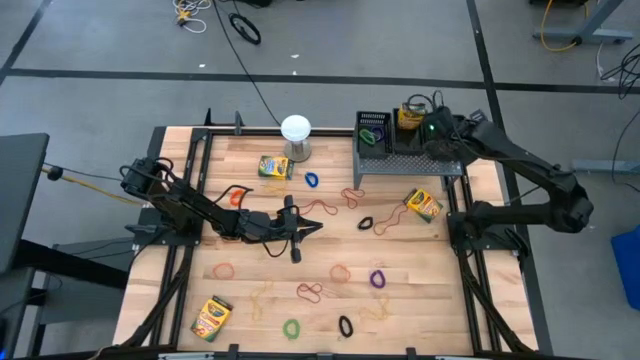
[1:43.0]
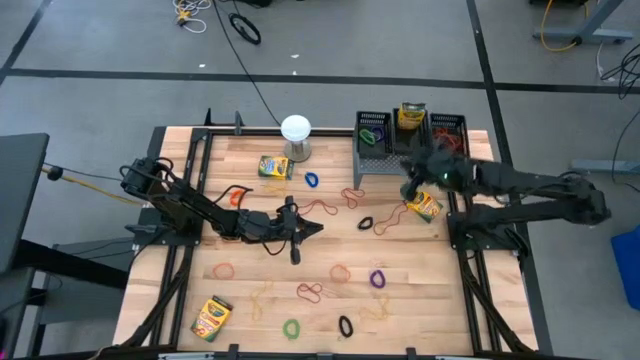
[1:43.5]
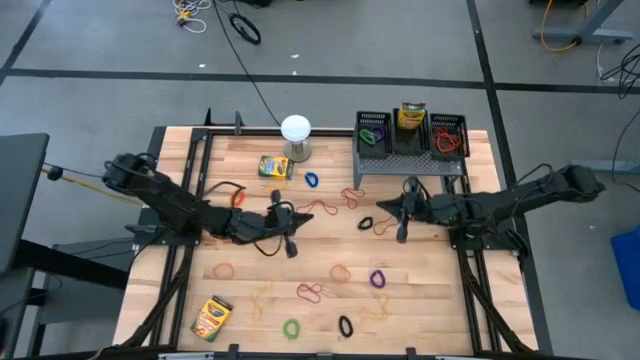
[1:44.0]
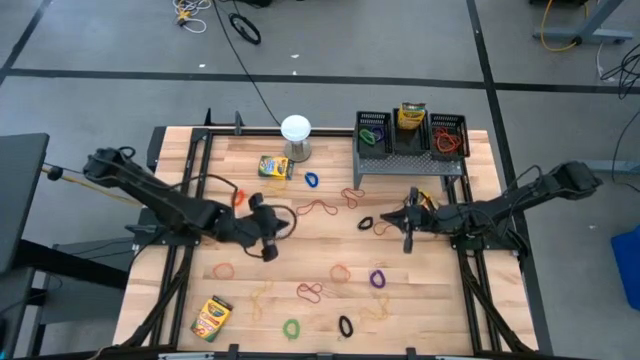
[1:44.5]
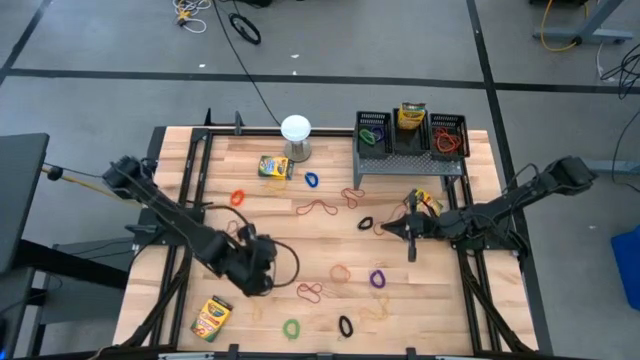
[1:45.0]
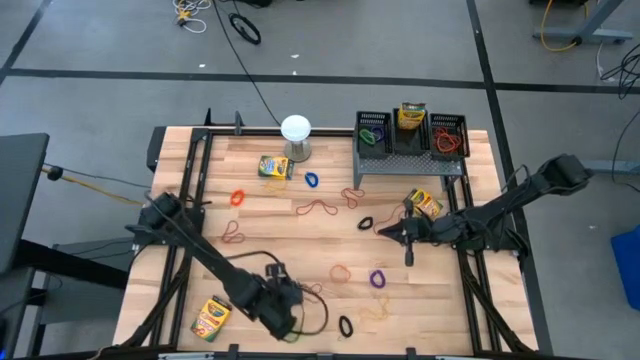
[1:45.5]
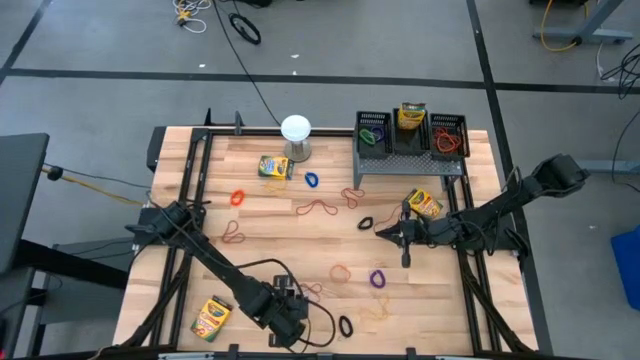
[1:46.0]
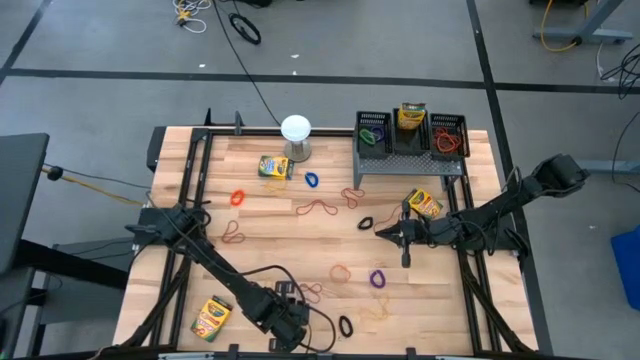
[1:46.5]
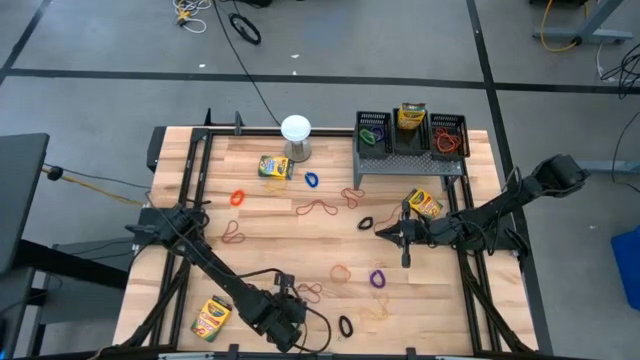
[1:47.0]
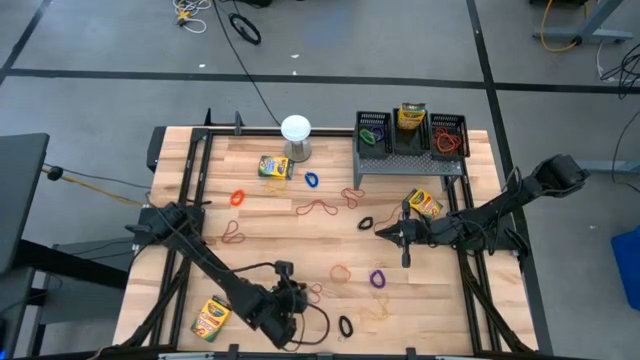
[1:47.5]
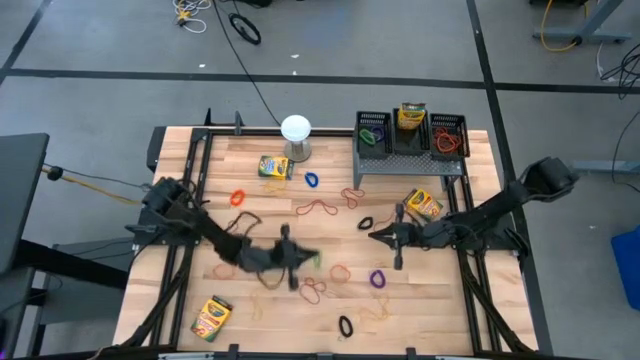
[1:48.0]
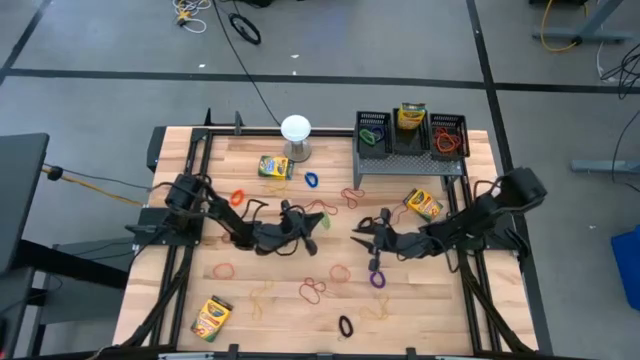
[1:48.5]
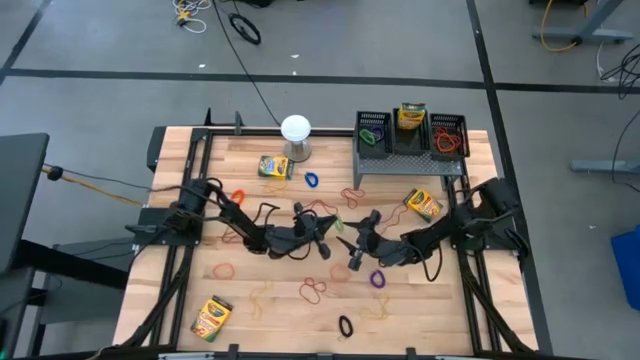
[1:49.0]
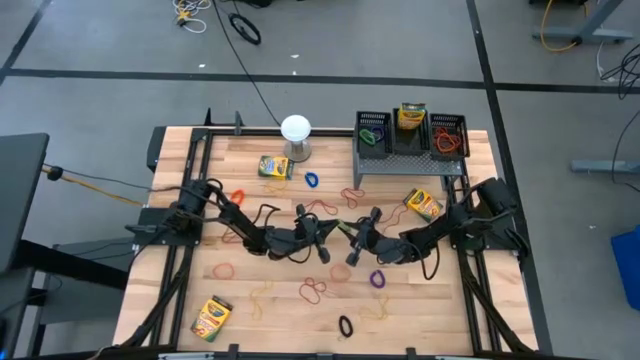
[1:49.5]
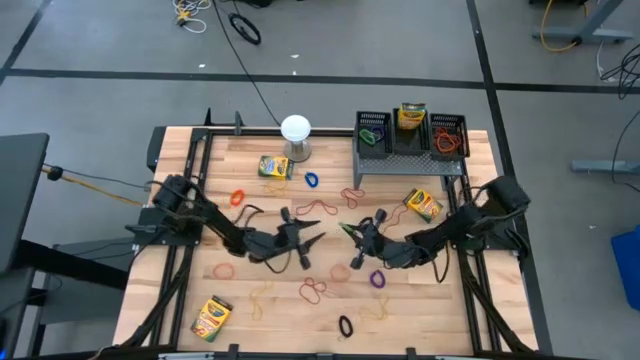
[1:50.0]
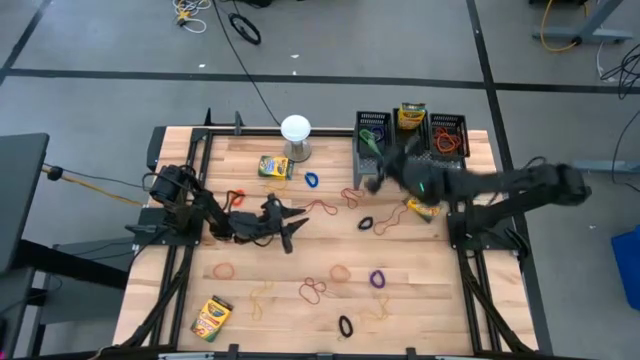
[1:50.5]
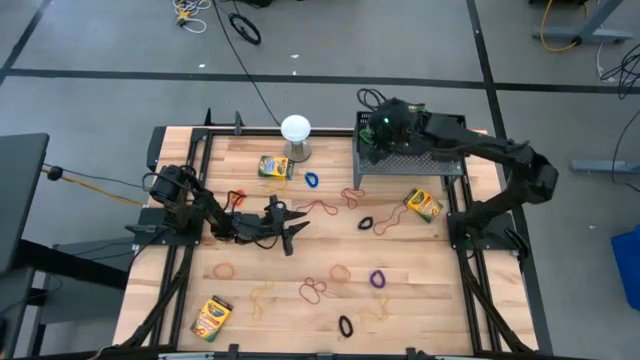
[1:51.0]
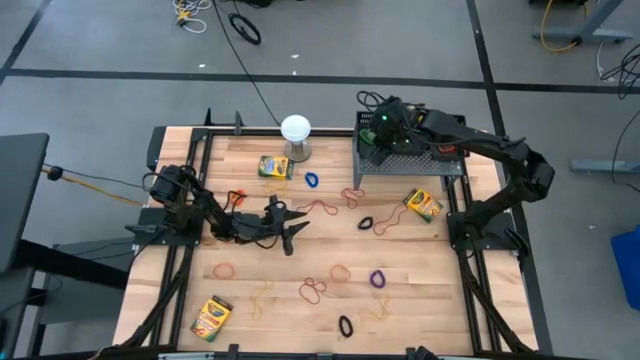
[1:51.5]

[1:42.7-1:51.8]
Task: Pick & Place Office Desk Supplies
Put the green spring keychain into the left black basket on the shelf

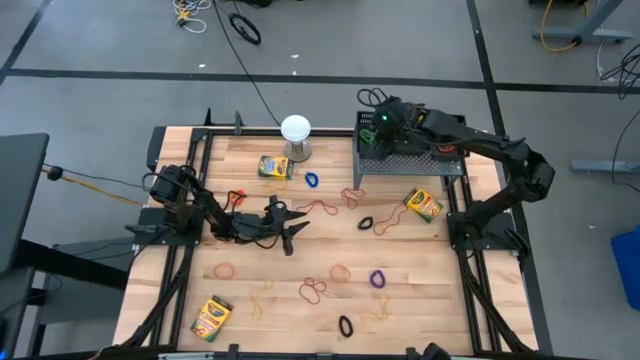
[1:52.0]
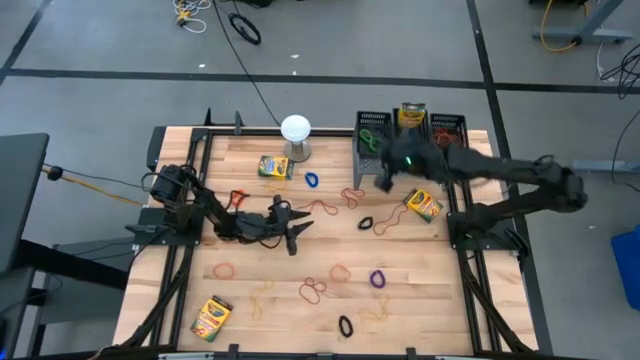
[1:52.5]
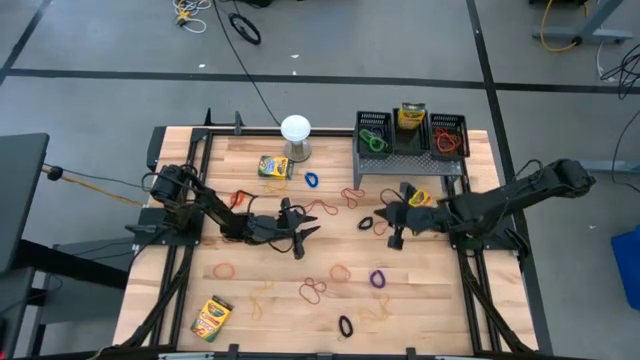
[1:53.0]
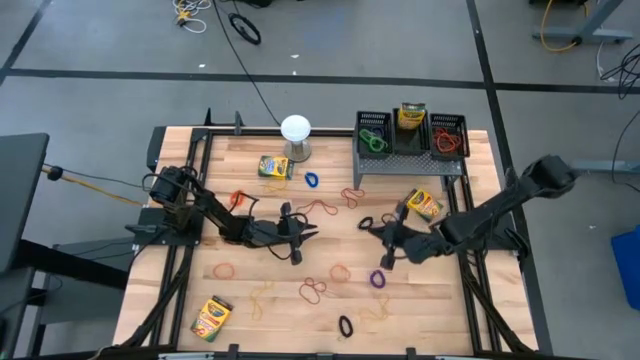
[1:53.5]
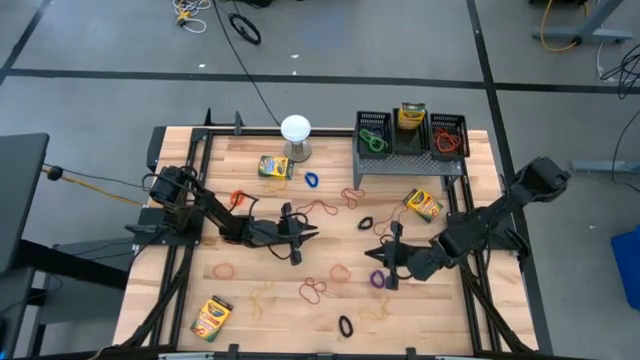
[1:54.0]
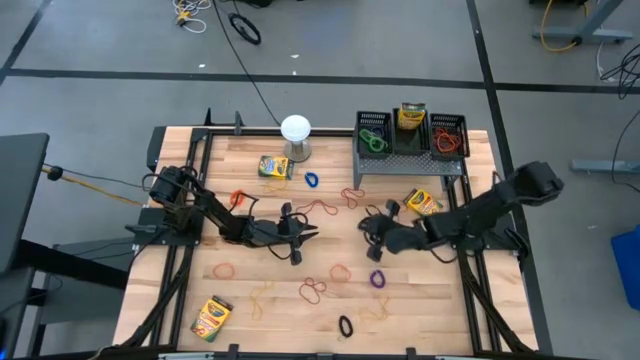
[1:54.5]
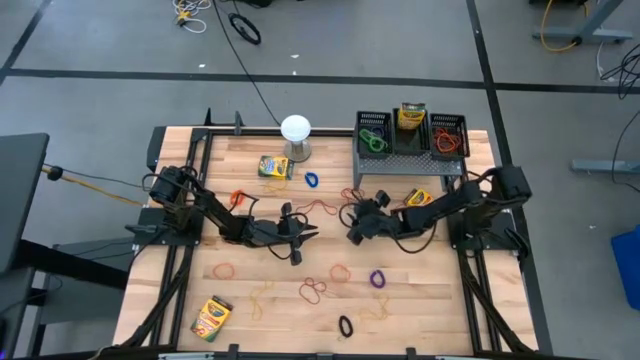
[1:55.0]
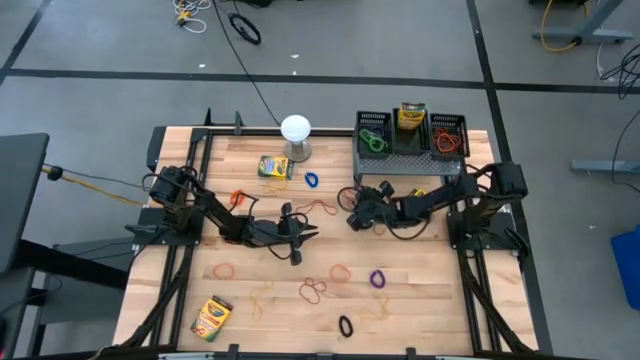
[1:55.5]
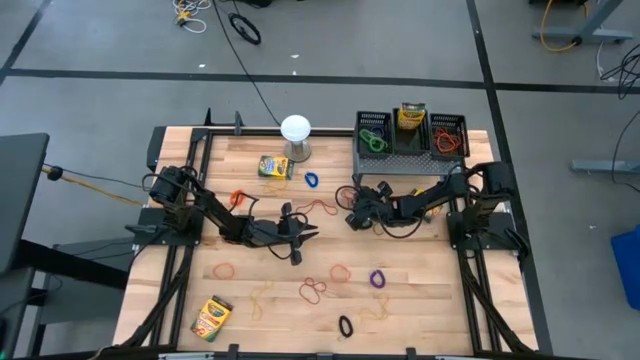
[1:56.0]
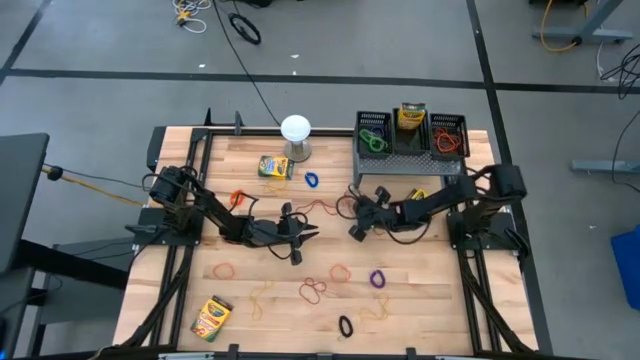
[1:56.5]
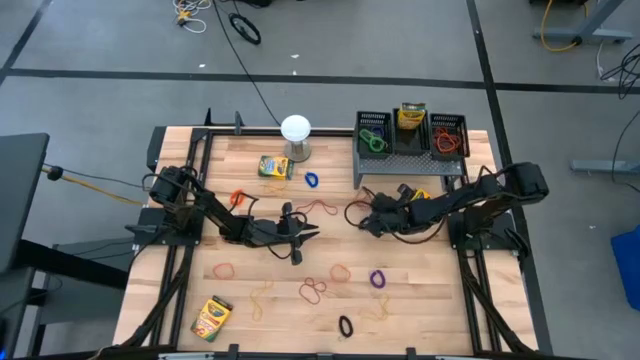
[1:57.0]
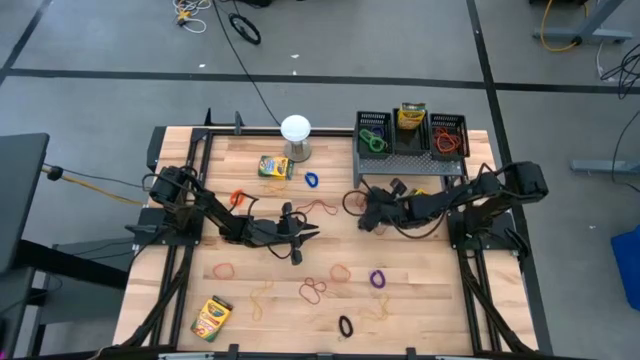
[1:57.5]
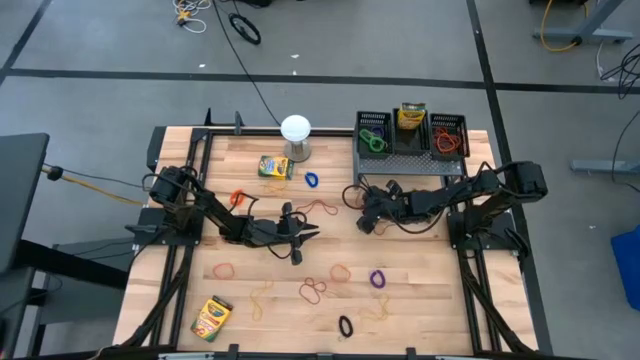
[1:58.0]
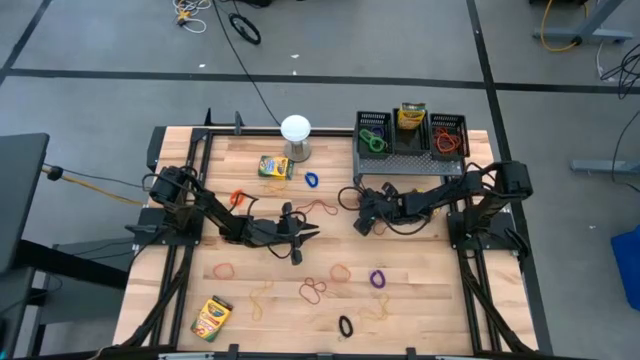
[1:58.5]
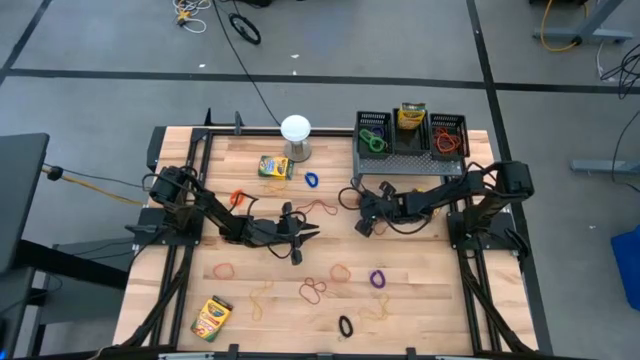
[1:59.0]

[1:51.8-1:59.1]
Put the red rubberband into the right black basket on the shelf

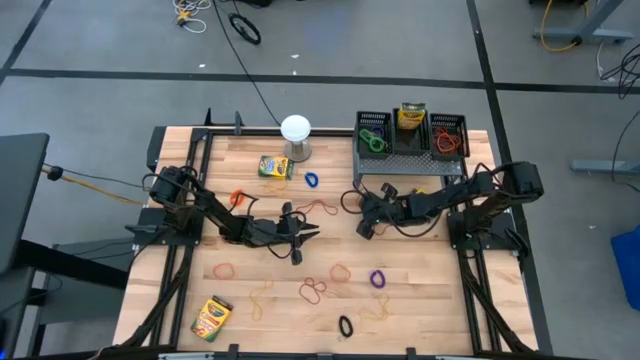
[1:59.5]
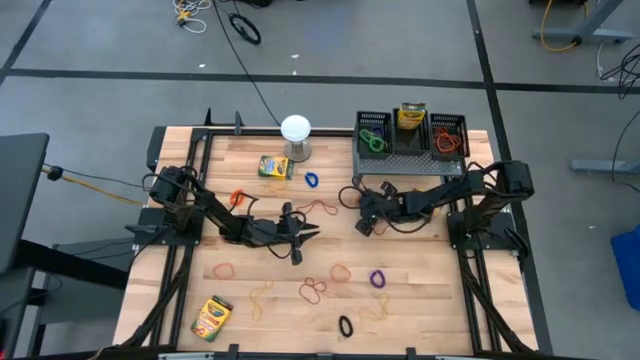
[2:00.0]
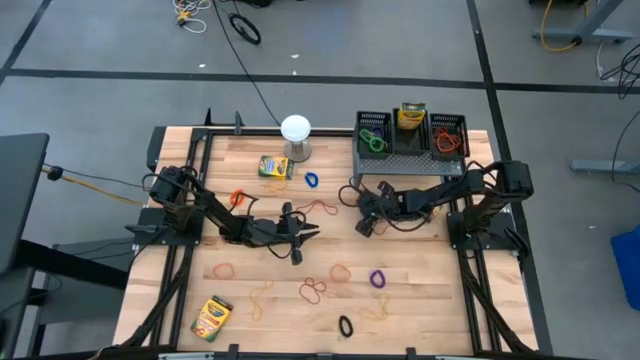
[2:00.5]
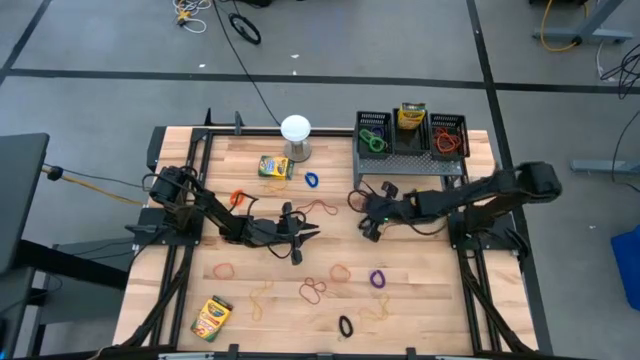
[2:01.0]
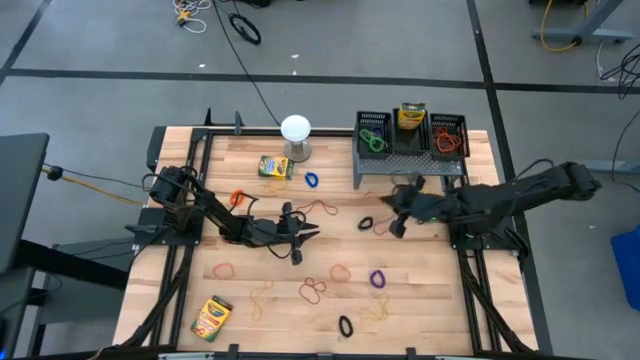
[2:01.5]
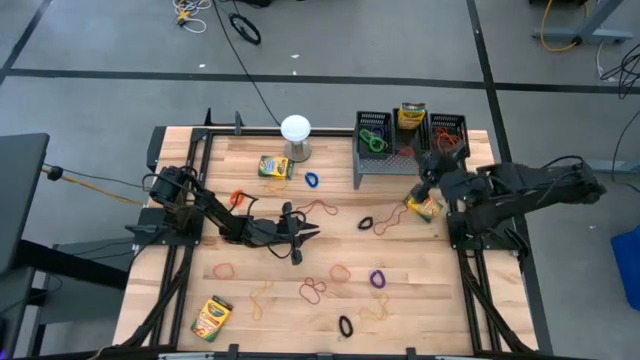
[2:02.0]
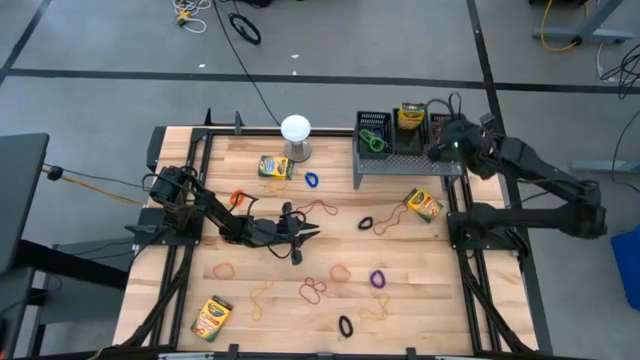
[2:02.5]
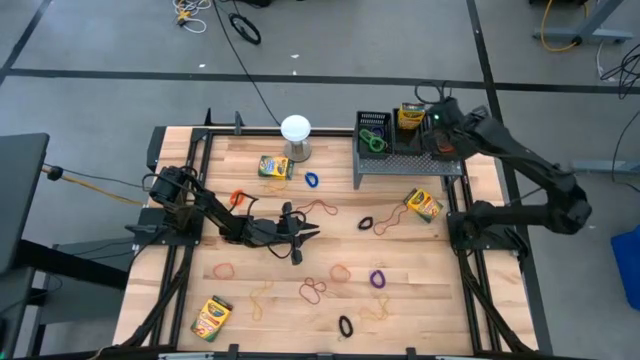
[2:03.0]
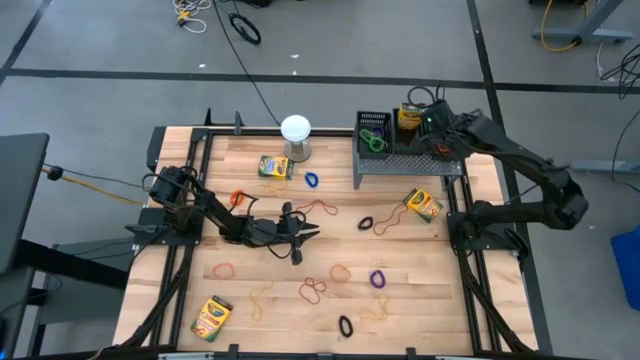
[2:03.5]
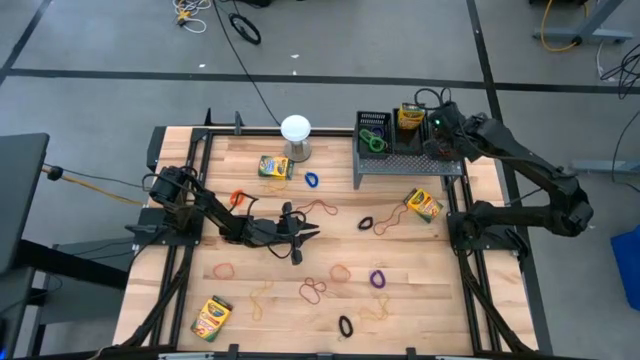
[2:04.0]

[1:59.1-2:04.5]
Put the red rubberband into the right black basket on the shelf
